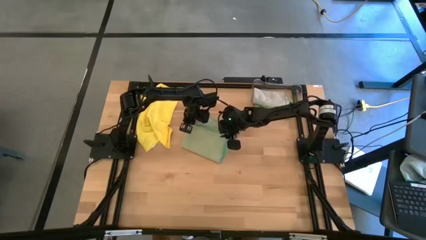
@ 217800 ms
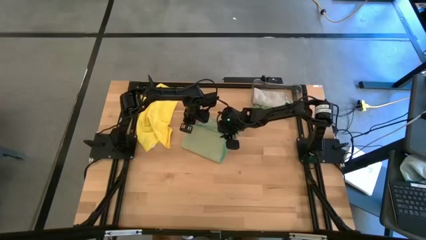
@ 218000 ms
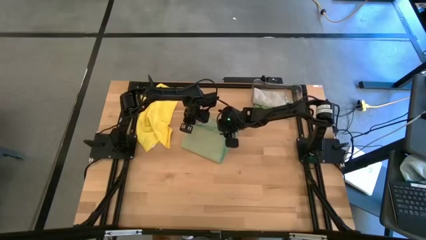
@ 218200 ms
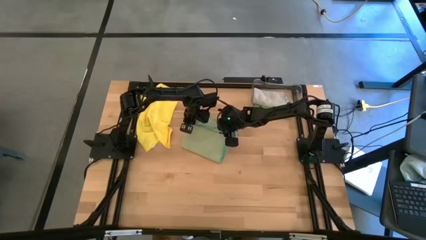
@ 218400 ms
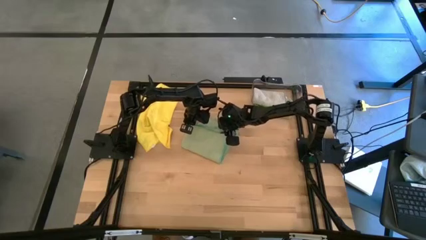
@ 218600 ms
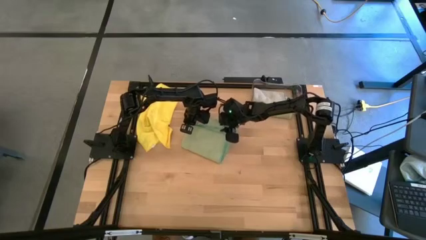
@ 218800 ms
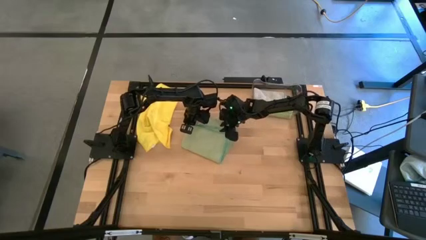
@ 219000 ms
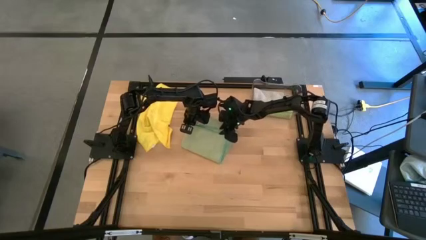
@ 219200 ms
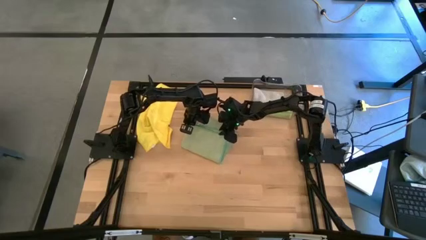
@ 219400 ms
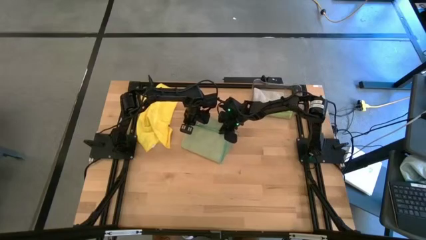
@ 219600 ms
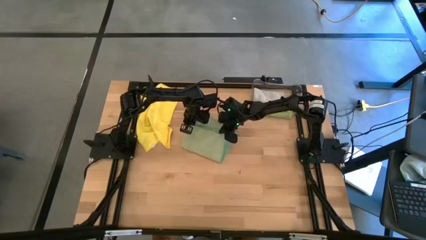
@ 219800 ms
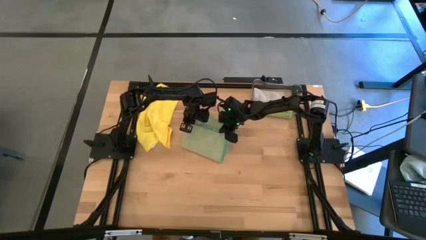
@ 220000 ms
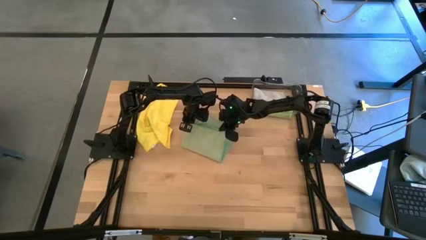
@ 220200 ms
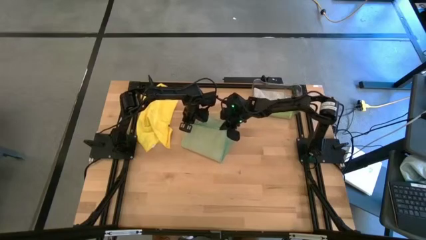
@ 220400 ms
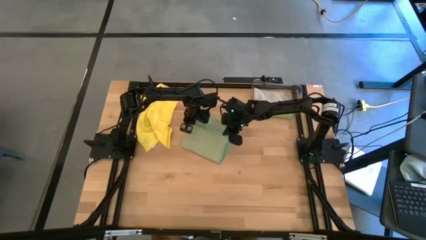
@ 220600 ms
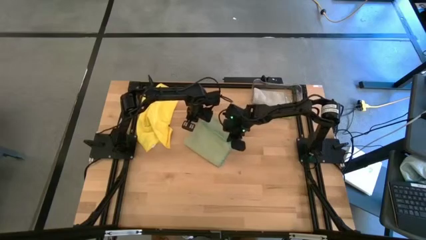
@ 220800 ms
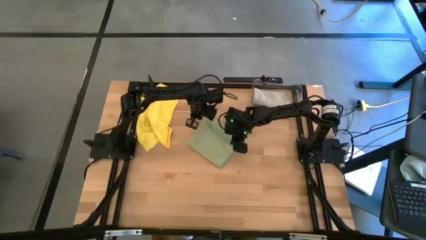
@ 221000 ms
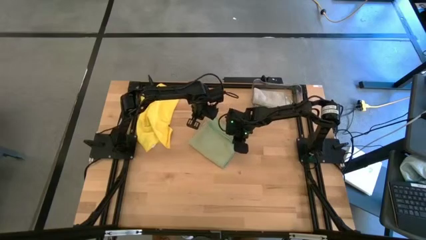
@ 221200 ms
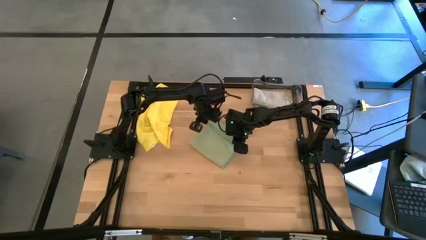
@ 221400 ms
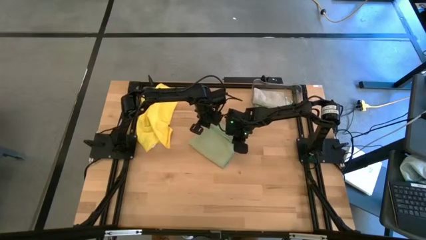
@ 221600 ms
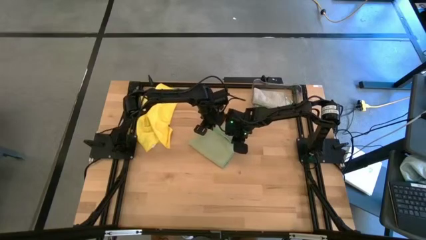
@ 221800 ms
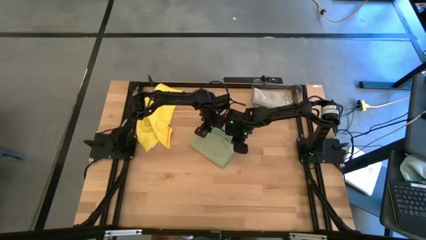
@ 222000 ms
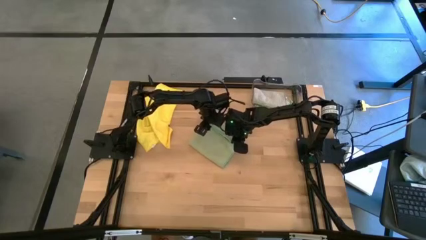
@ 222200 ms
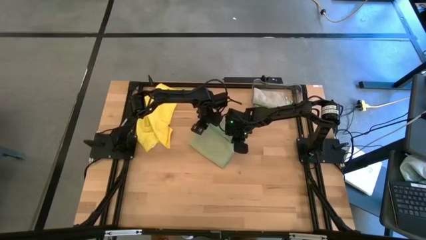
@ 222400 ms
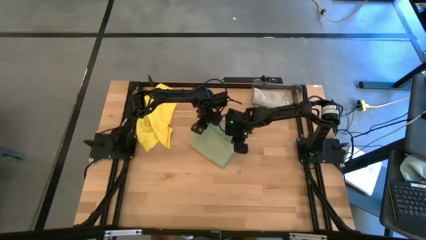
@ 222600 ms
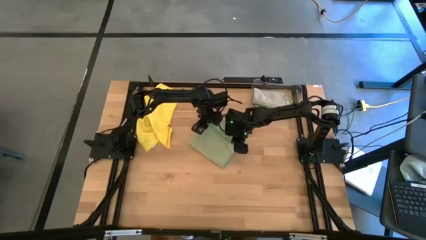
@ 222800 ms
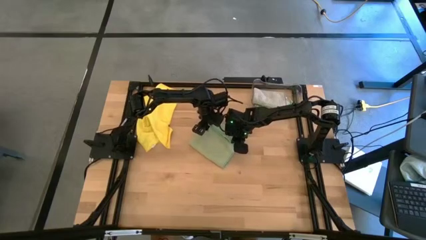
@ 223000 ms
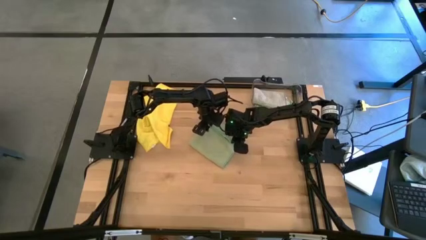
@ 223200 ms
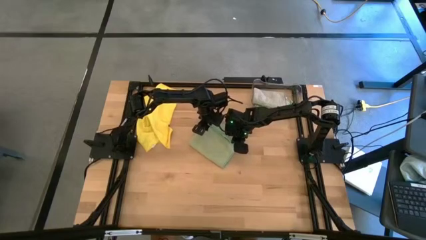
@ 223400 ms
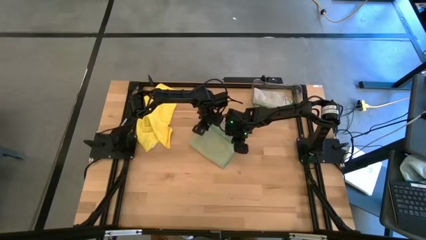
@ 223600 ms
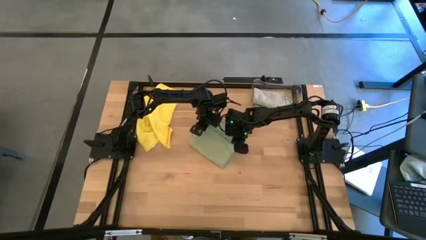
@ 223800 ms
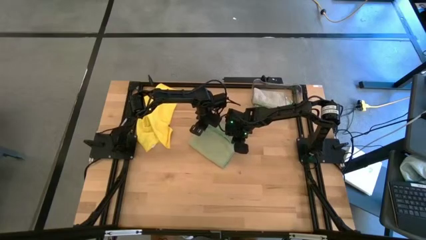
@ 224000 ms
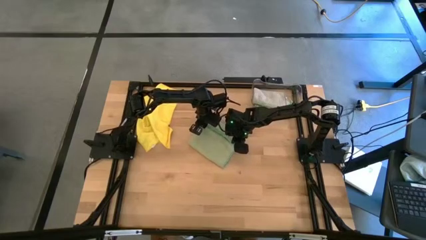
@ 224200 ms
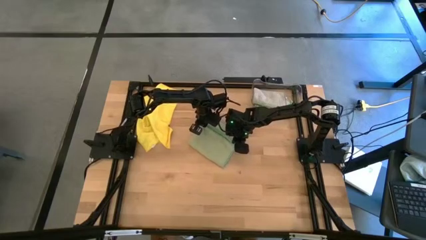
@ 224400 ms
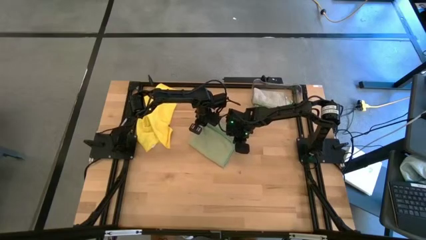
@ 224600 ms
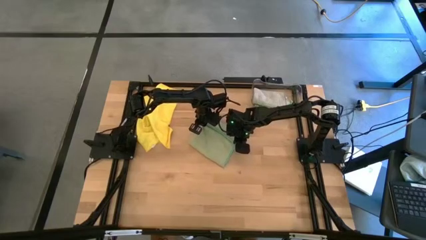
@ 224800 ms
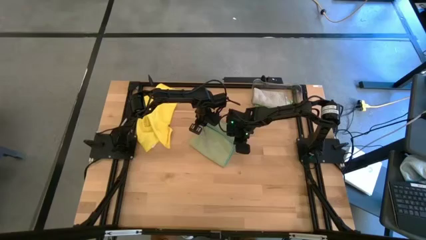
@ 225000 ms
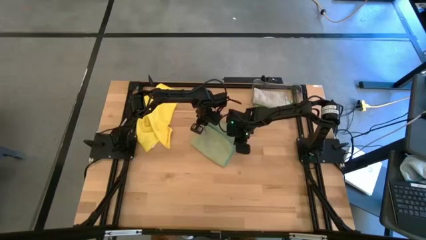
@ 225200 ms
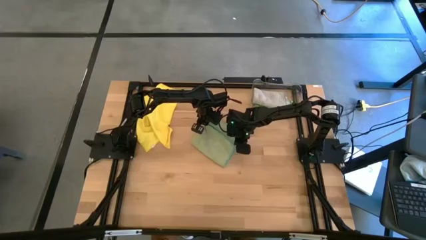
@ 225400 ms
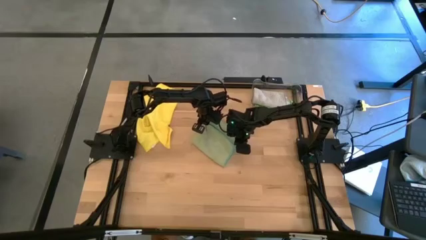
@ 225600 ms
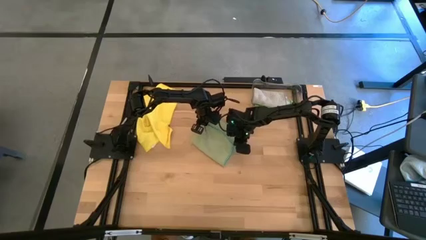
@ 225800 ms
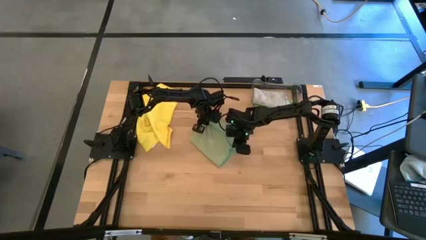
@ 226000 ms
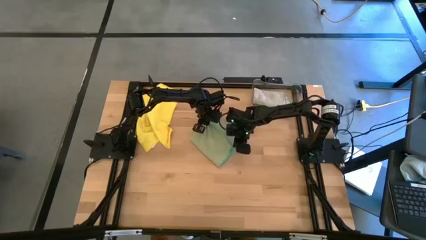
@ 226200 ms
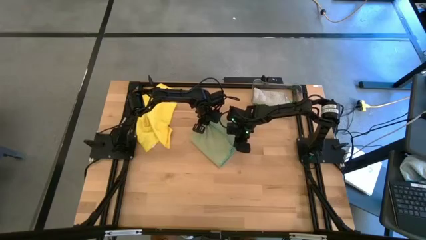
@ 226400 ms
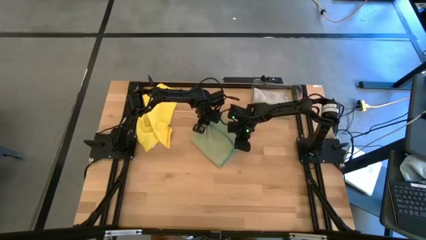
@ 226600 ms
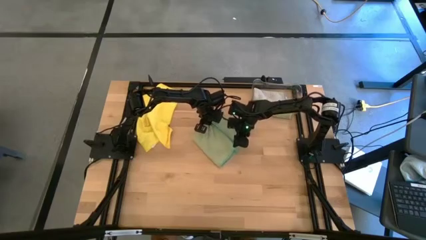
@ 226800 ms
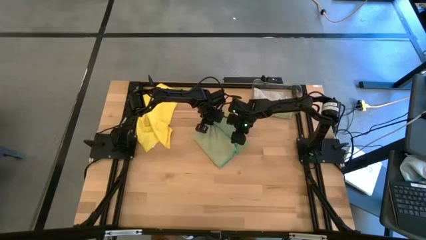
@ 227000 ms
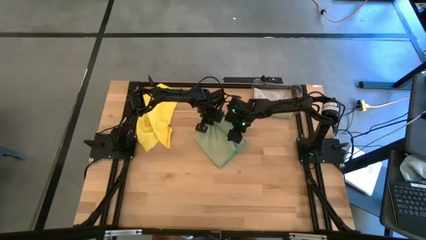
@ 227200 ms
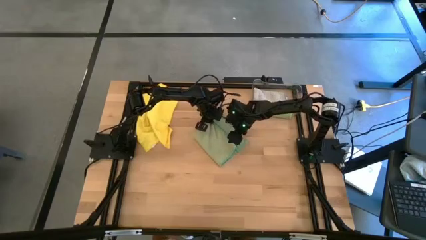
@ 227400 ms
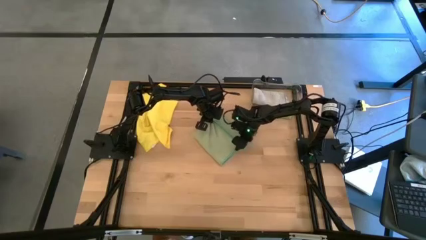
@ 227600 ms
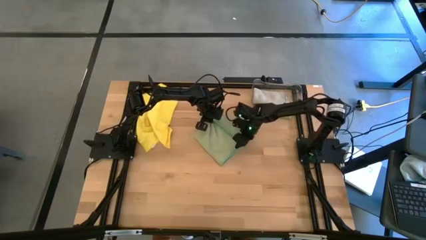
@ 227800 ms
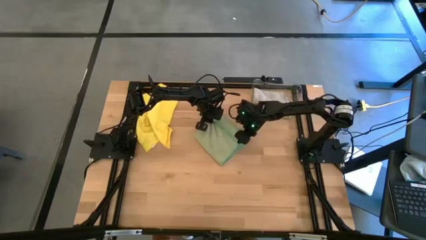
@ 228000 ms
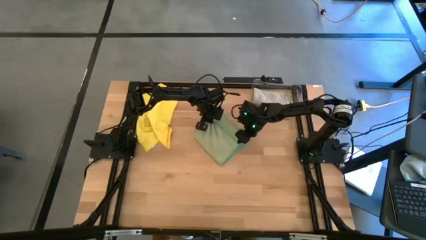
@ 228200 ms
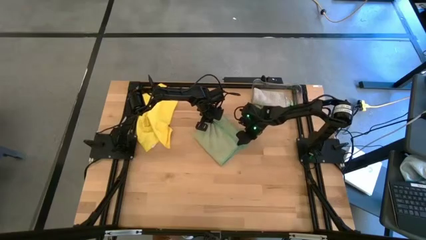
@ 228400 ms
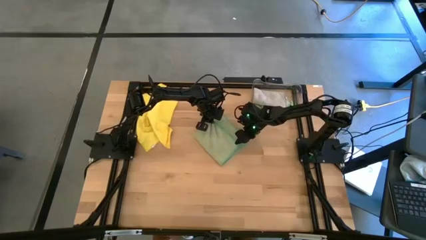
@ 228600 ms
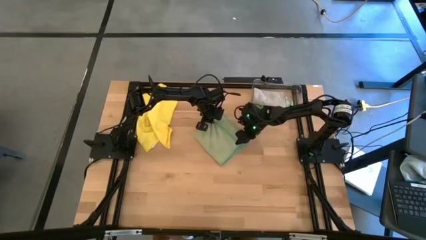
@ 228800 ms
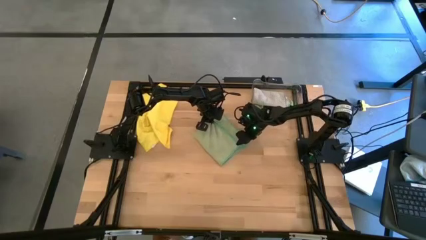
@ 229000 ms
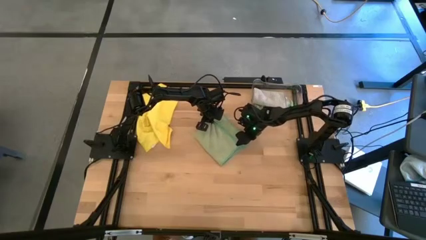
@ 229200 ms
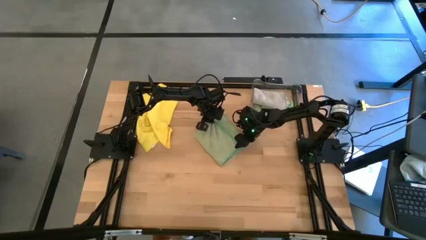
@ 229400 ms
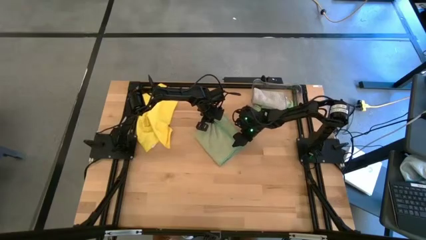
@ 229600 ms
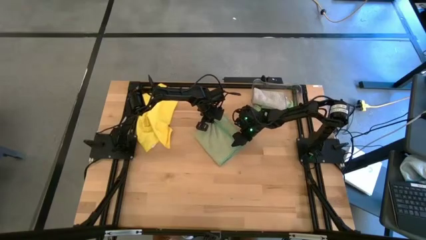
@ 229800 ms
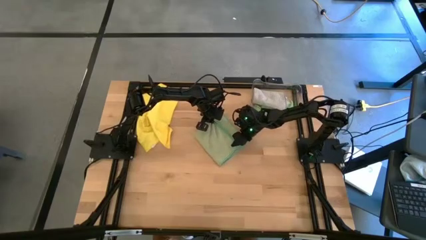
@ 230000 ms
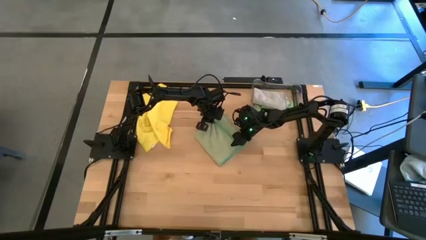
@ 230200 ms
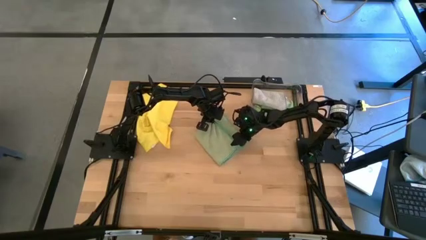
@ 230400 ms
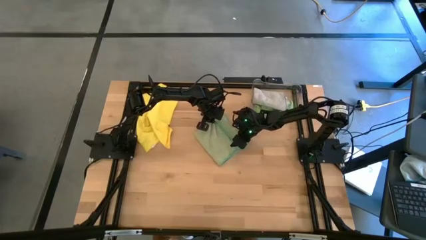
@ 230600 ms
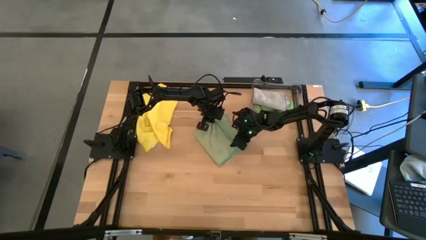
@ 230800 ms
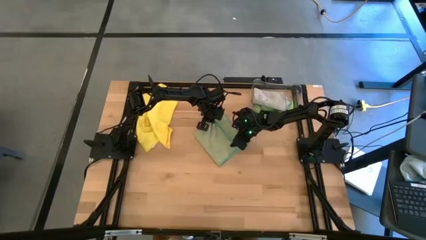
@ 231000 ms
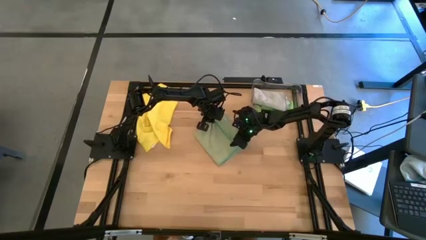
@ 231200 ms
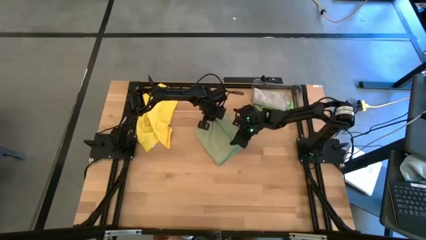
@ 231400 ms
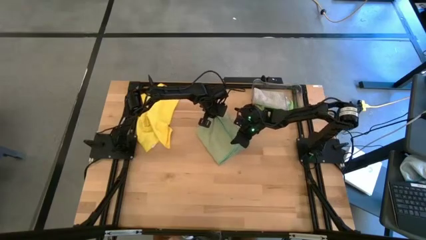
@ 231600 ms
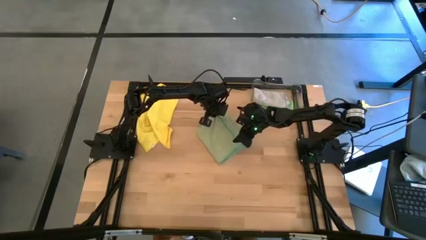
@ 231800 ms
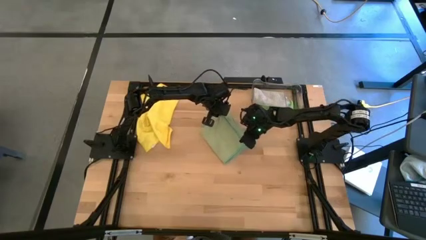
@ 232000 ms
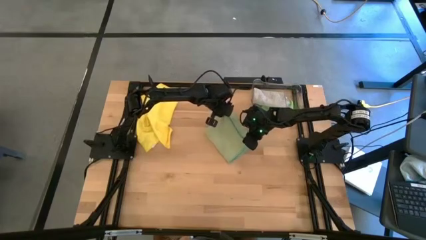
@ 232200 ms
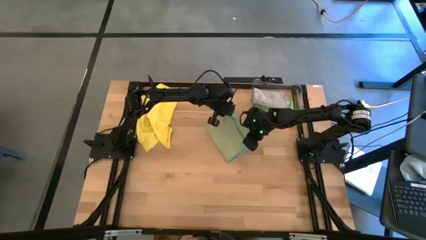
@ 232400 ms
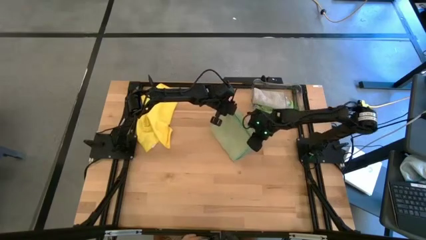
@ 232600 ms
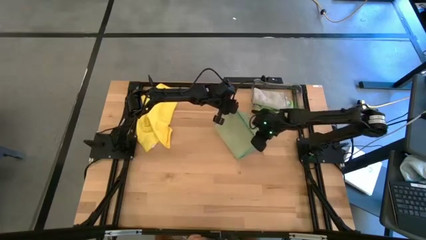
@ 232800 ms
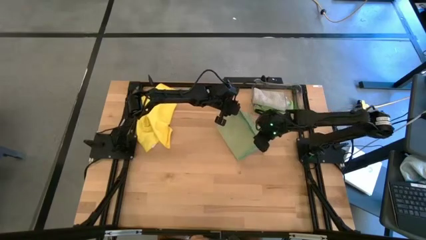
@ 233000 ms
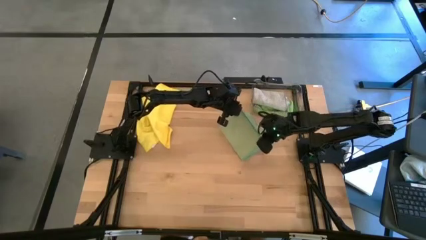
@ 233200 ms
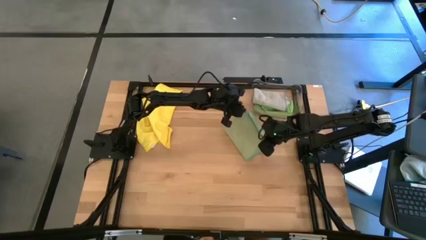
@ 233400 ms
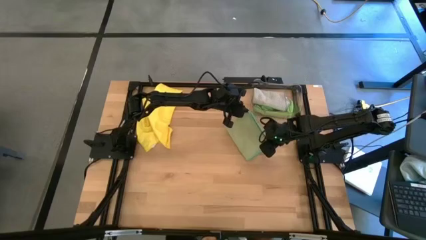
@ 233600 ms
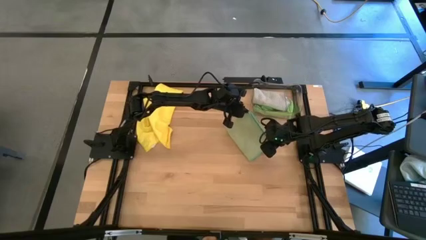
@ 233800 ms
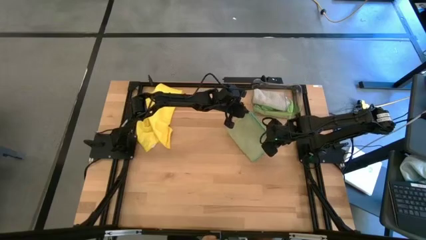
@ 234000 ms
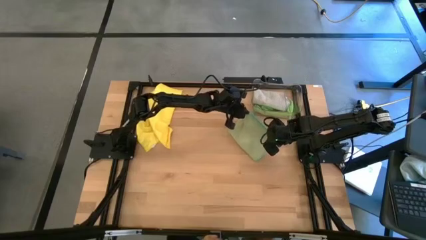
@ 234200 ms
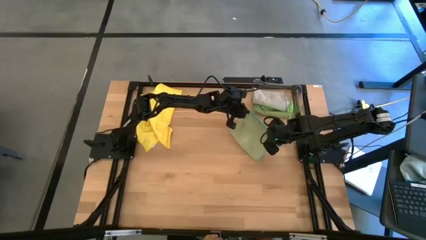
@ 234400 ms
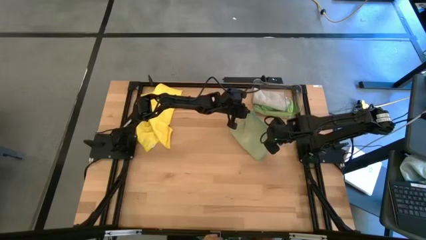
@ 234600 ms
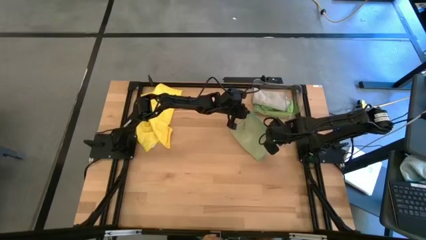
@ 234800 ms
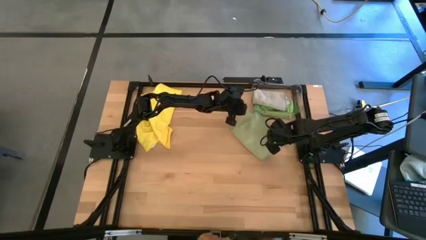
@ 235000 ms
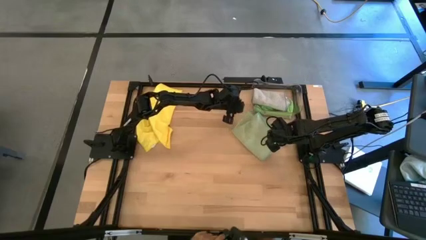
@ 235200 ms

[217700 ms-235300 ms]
Task: Fold microfiber towels
Fold the light green cloth
